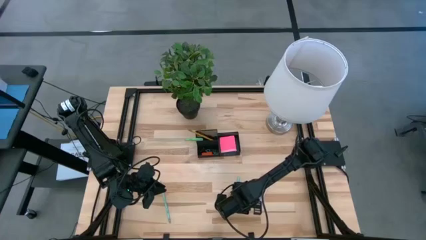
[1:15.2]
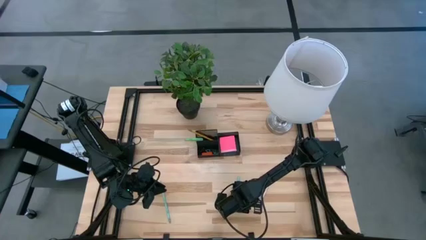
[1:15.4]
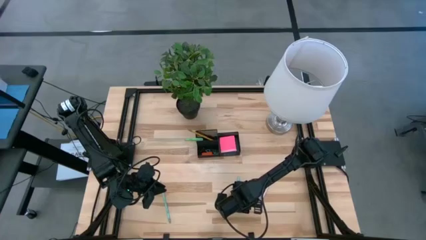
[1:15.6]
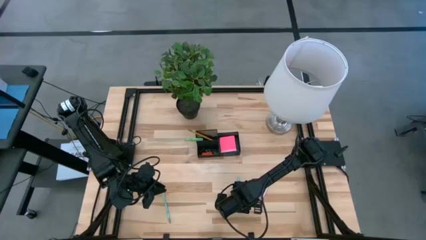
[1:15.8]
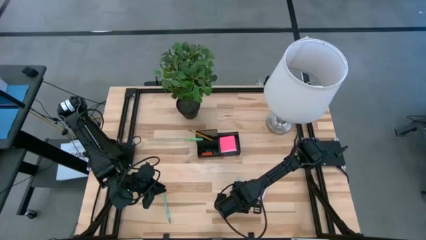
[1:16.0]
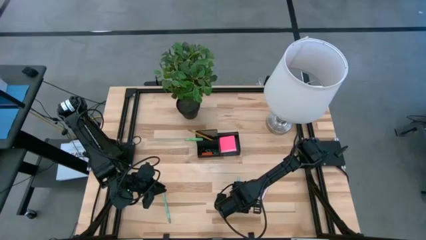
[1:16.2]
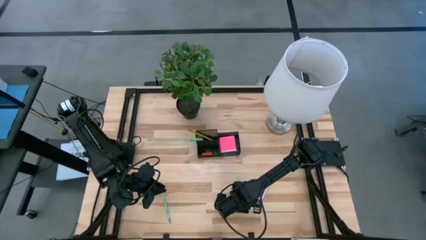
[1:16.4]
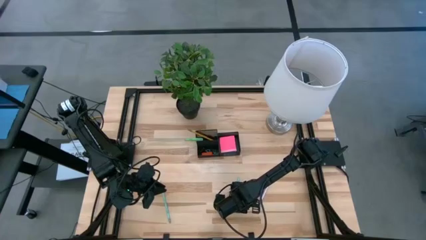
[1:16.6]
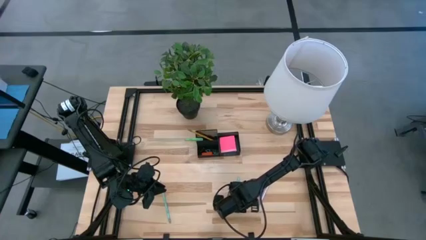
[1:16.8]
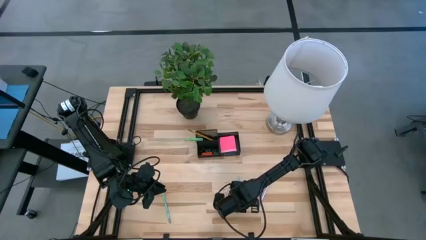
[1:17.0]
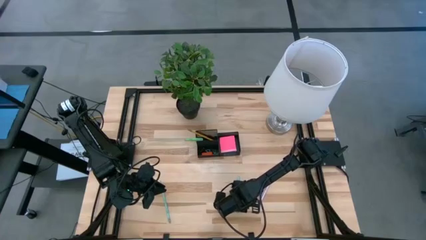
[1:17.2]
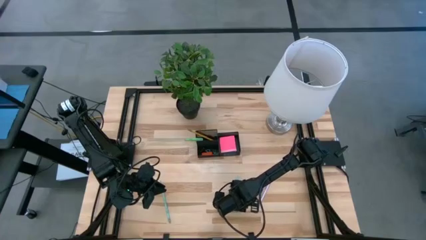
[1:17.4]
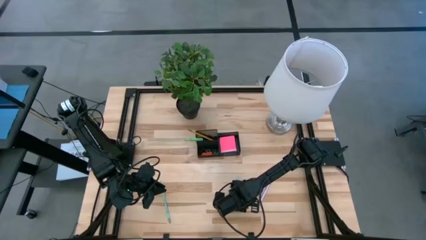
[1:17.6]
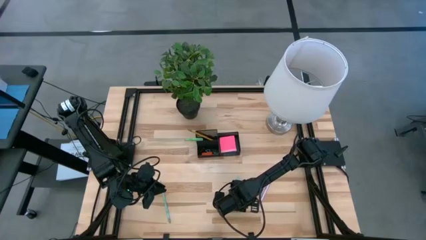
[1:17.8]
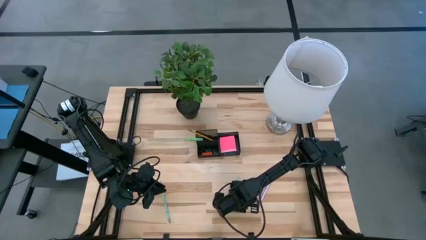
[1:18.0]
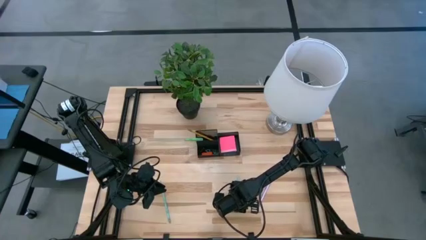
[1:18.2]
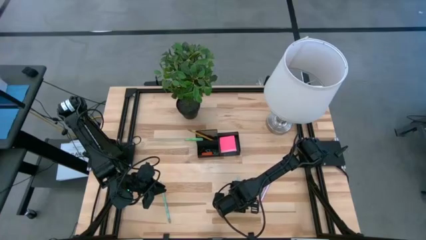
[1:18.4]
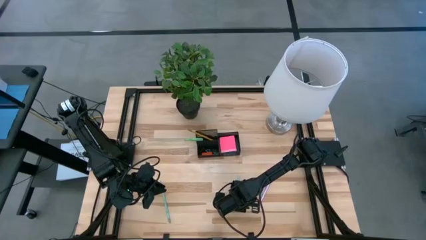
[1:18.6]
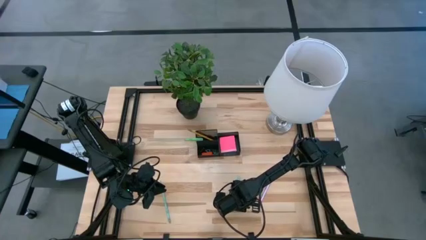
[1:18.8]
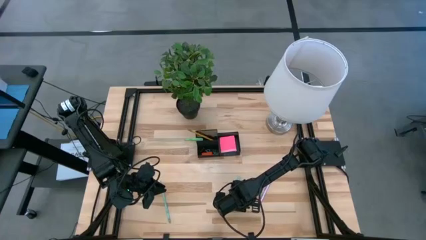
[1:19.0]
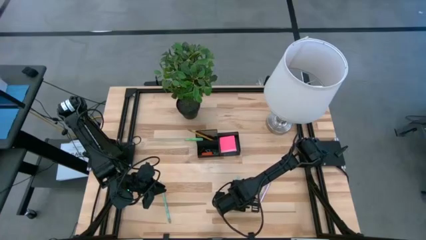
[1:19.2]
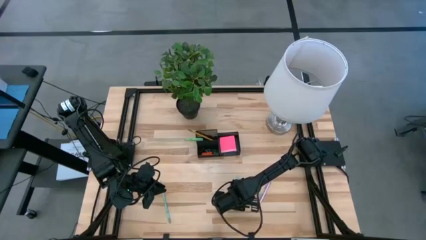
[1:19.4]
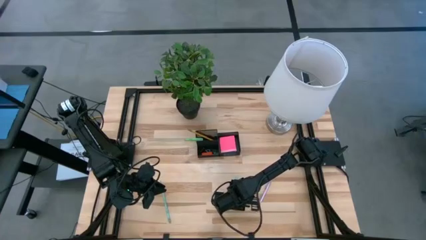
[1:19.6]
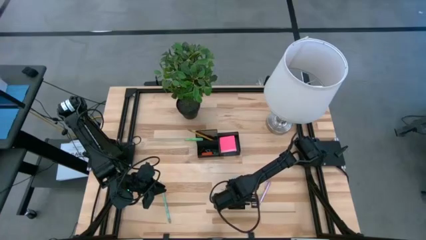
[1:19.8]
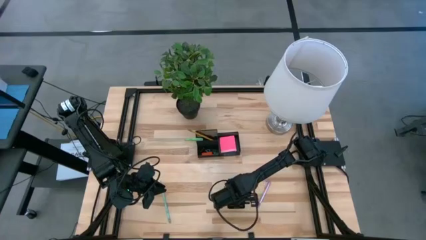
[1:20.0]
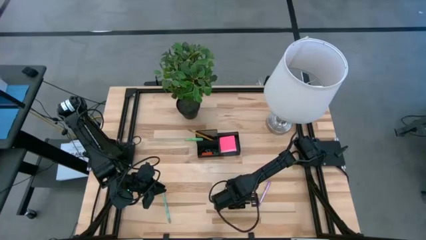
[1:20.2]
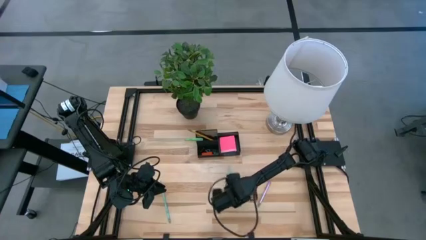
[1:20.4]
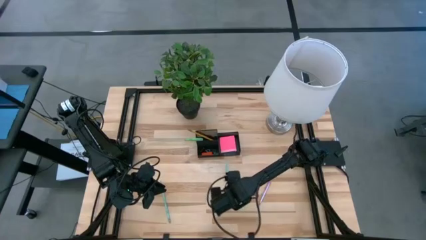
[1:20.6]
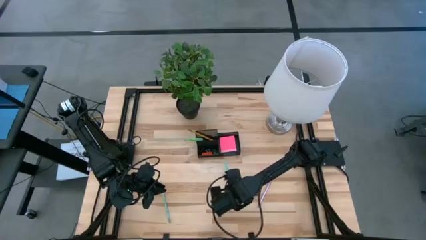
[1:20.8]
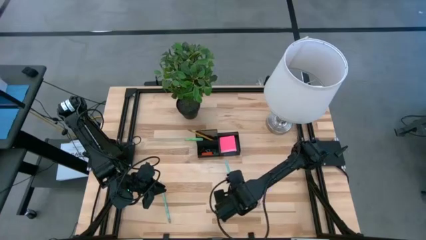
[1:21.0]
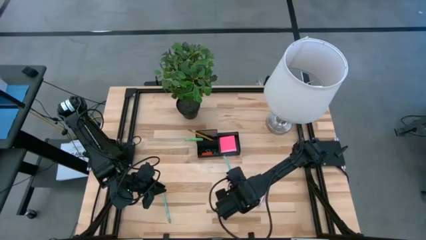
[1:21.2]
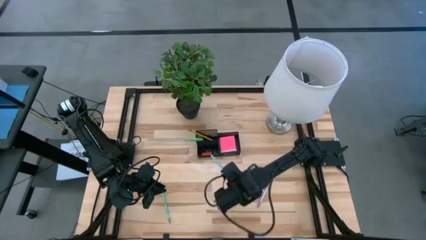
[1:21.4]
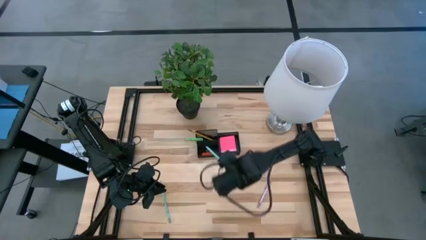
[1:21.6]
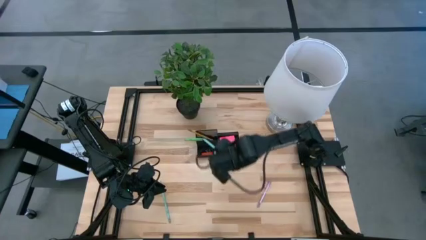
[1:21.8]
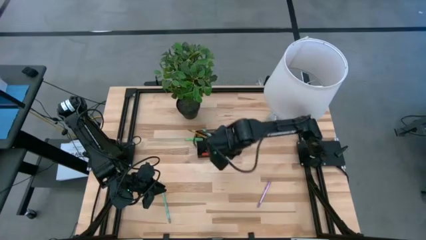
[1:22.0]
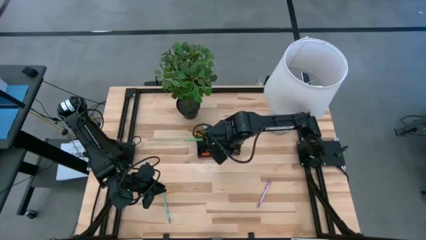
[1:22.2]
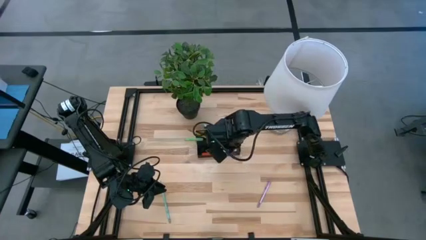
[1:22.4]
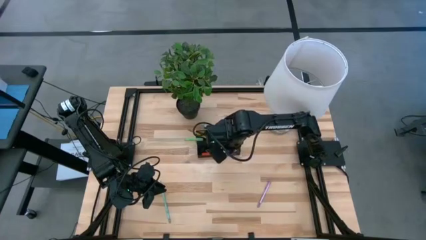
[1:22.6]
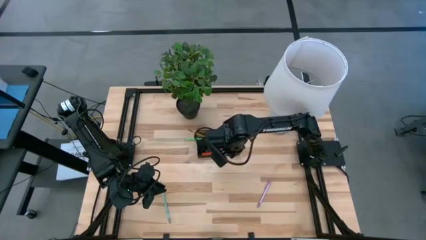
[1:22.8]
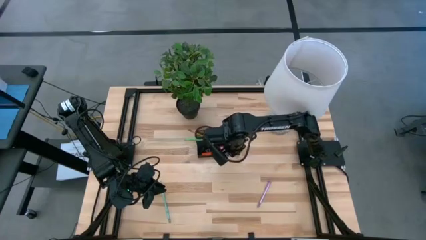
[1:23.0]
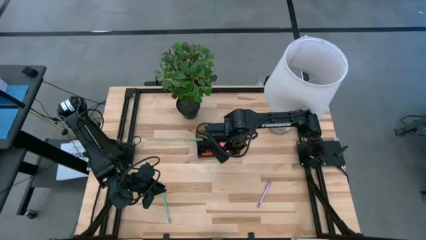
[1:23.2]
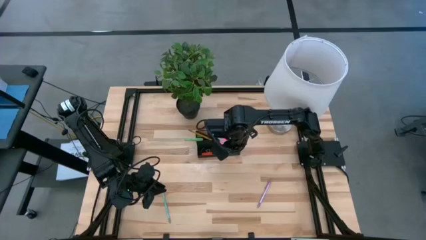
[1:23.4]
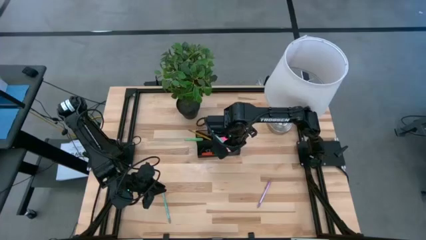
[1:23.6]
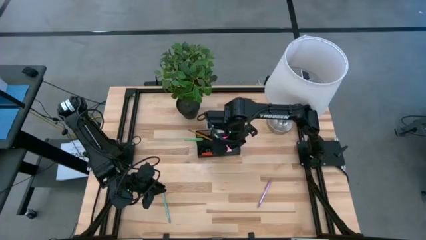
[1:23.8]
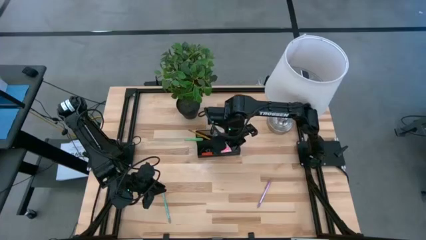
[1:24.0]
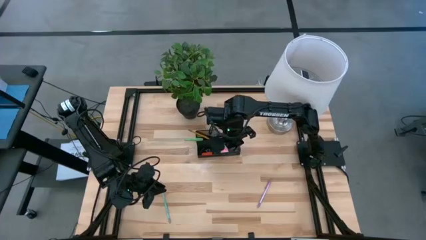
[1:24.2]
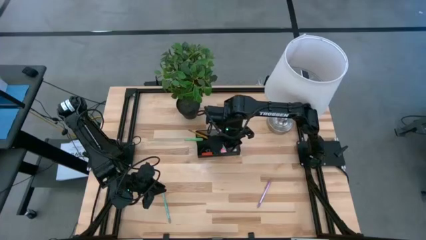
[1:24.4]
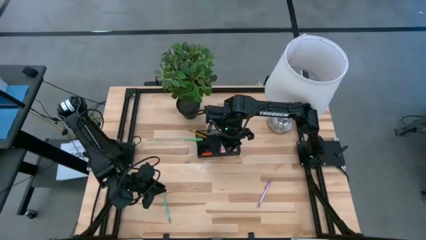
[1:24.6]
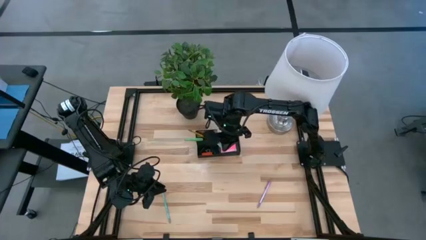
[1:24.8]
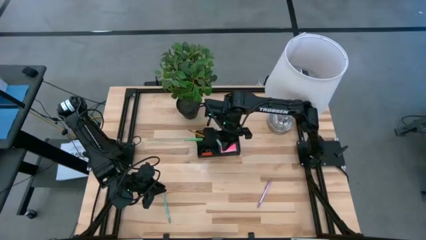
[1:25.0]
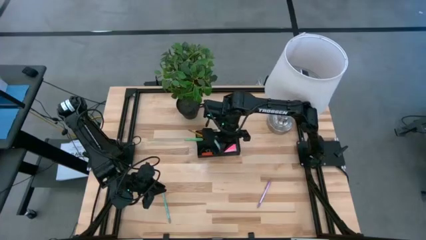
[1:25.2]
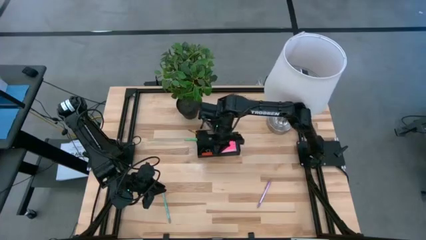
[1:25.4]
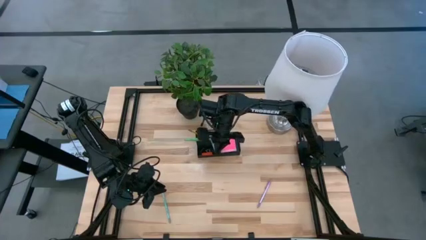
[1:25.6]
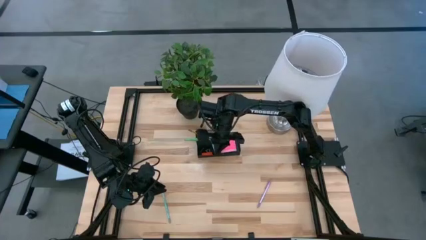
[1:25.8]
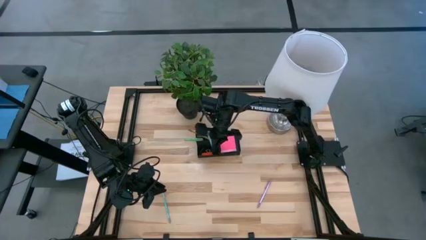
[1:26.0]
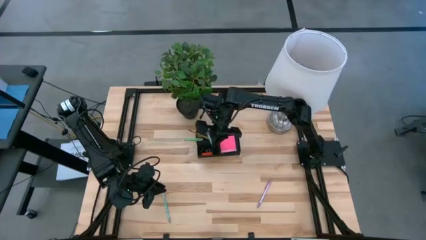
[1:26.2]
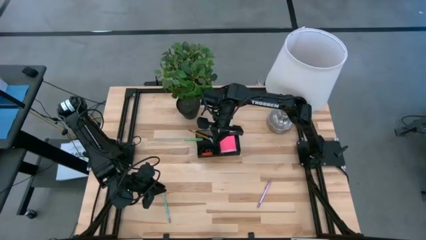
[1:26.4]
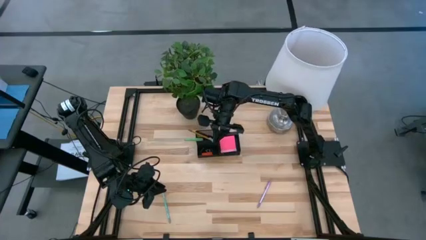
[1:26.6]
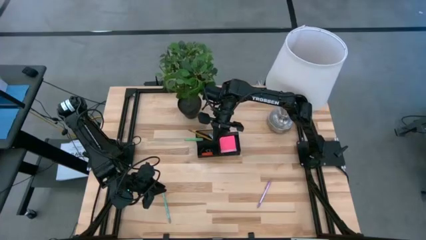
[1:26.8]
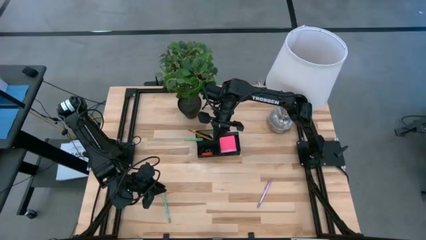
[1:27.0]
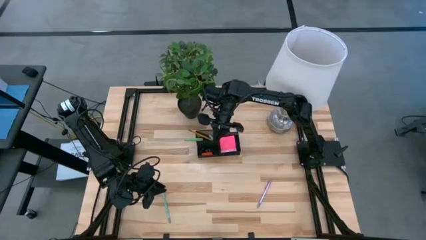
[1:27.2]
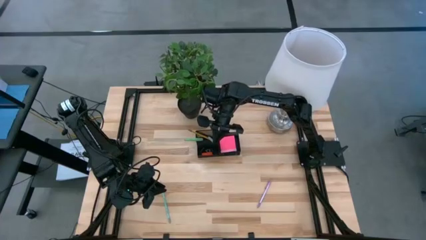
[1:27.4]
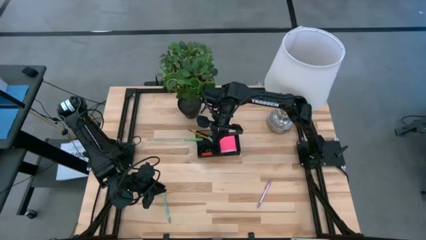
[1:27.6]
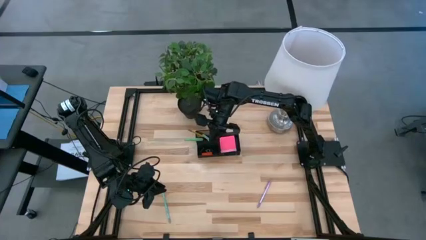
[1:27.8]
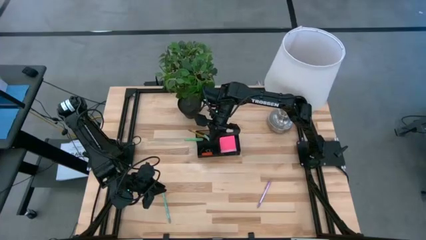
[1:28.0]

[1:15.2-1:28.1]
Task: Pick and place office supplies into organizer
Put the blue pen into the black desk organizer
